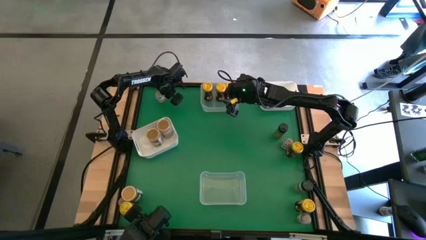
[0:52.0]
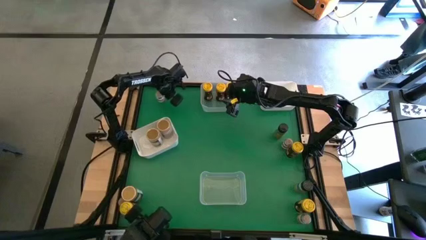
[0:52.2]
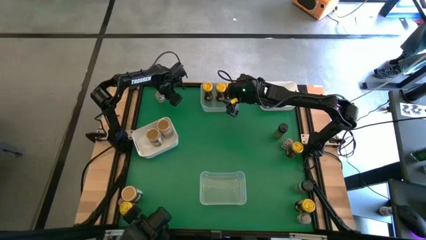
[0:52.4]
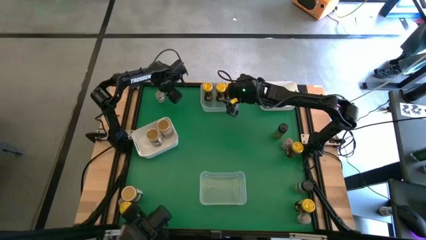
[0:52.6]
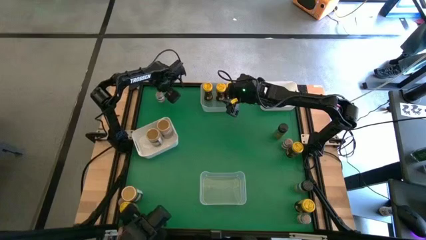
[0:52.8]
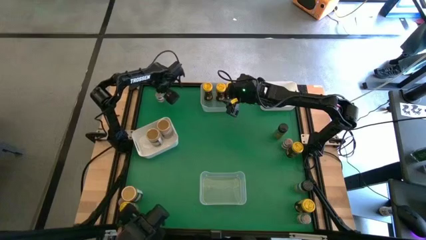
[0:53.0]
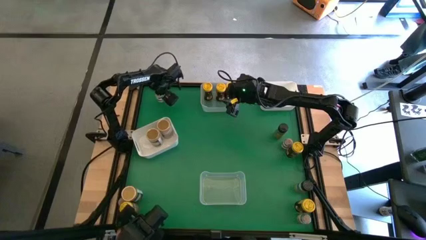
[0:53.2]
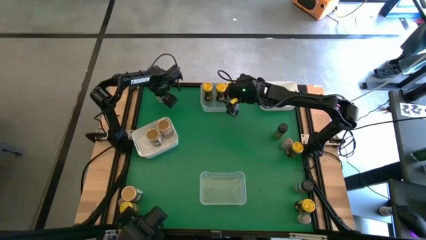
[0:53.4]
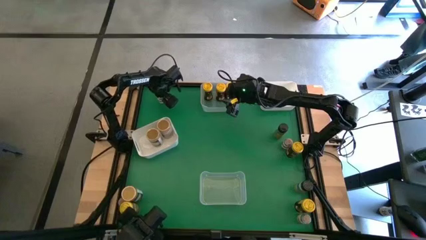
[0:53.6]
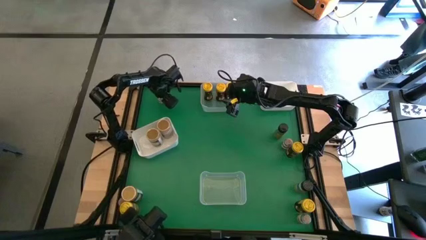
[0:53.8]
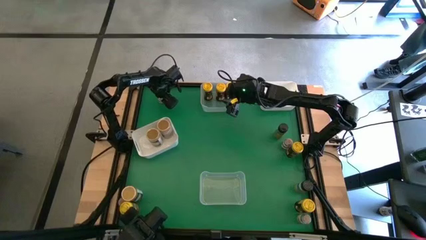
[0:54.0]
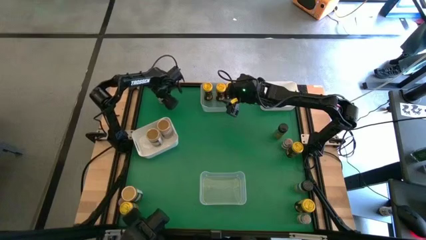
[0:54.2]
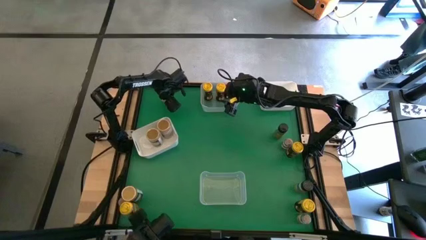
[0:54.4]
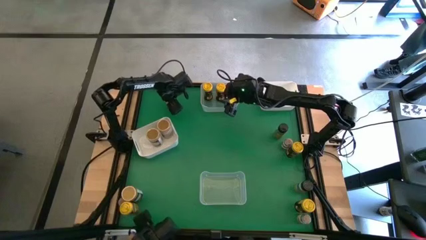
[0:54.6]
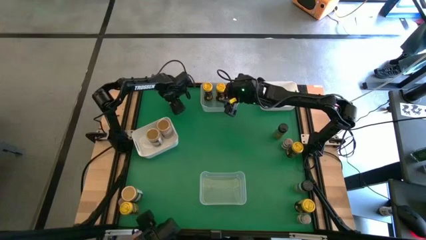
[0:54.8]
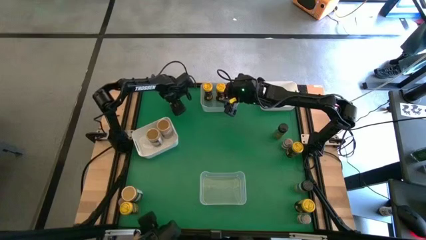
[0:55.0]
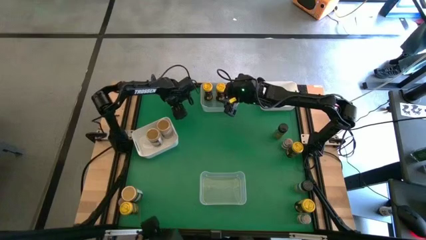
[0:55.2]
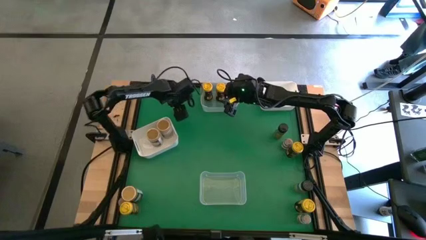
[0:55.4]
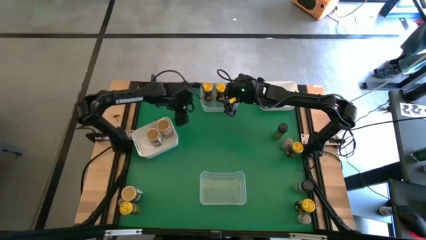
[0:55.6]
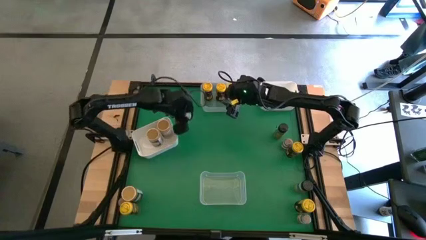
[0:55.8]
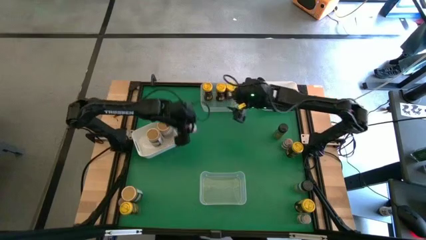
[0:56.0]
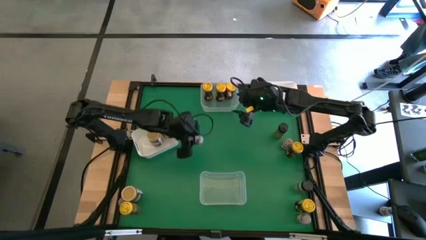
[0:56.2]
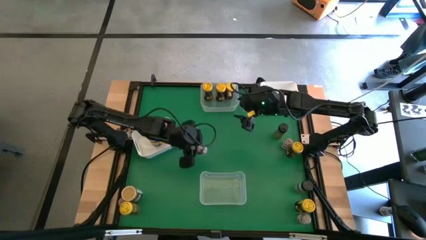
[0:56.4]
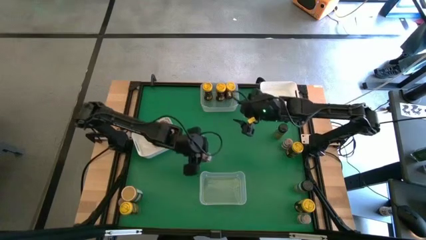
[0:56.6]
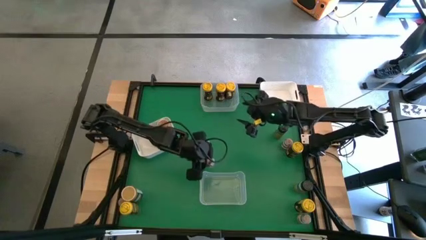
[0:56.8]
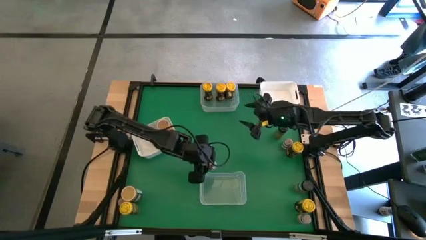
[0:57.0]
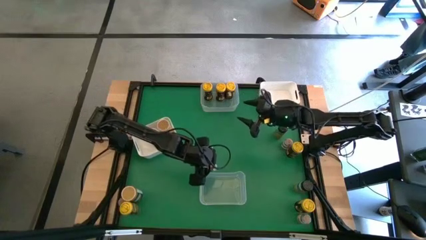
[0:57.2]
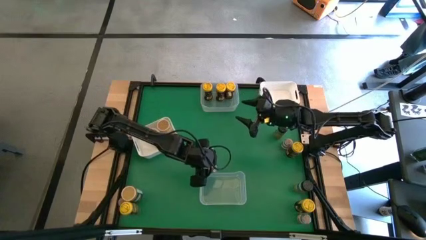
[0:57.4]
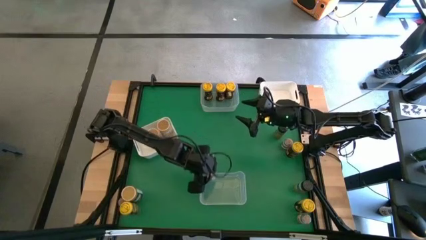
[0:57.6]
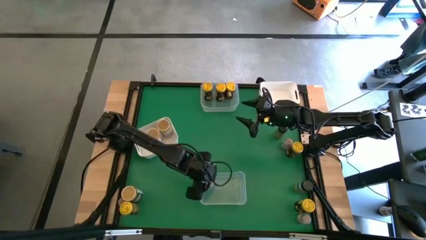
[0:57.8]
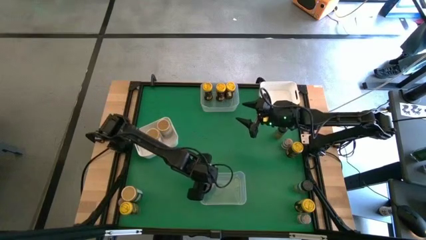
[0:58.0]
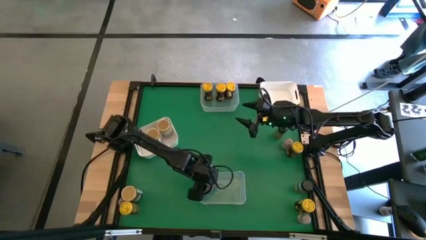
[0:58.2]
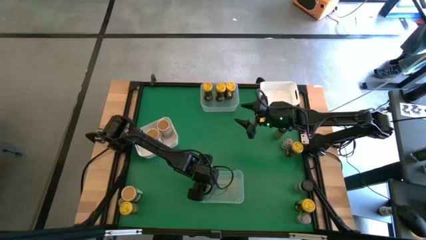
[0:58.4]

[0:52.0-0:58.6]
Task: Sort spices by type
Put the brown spice bottle into the bottom transparent bin

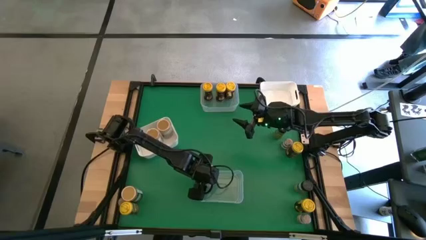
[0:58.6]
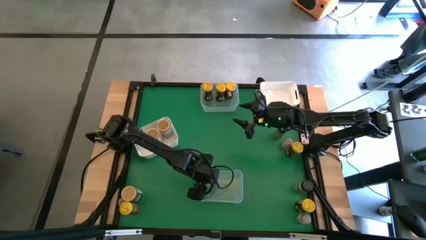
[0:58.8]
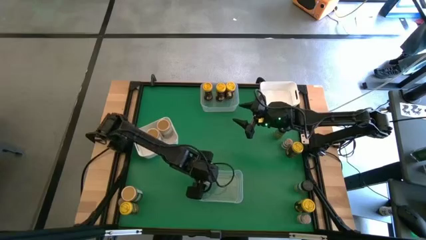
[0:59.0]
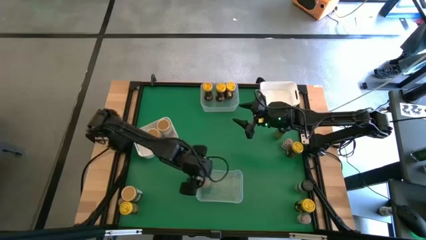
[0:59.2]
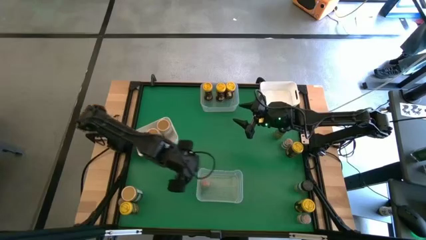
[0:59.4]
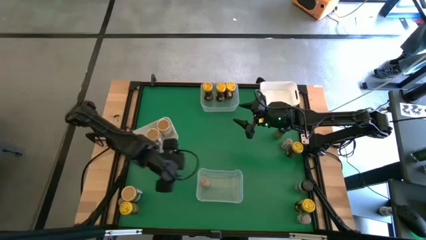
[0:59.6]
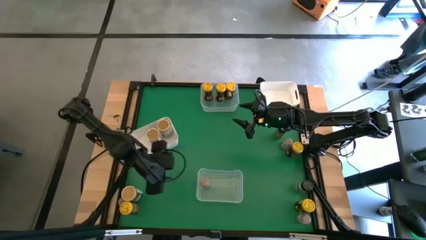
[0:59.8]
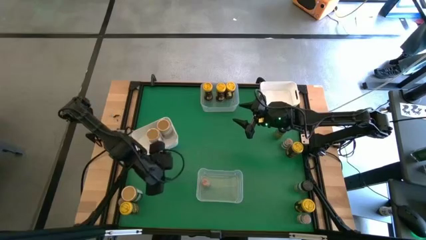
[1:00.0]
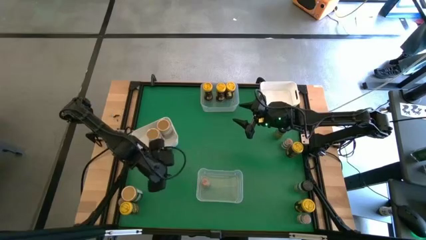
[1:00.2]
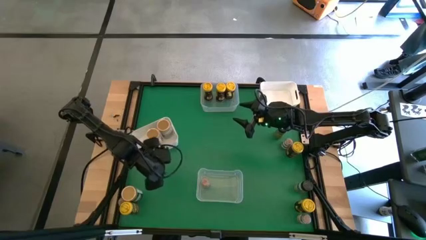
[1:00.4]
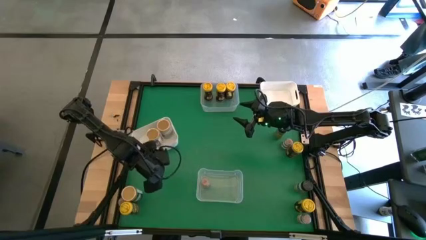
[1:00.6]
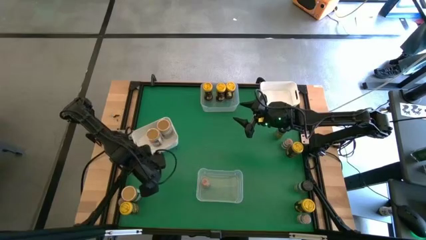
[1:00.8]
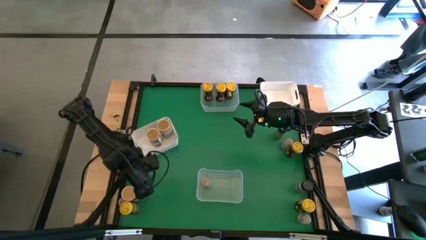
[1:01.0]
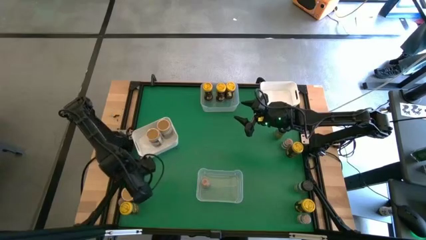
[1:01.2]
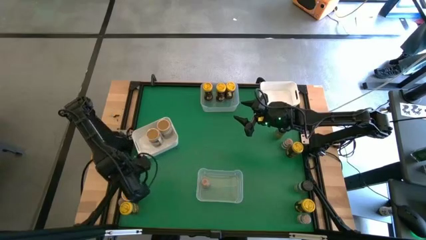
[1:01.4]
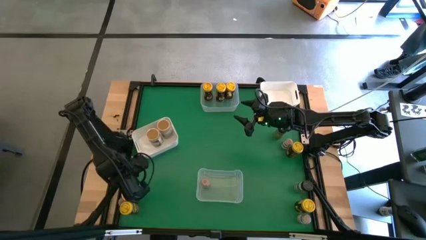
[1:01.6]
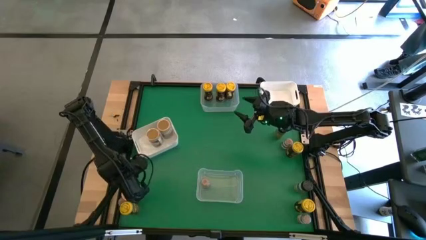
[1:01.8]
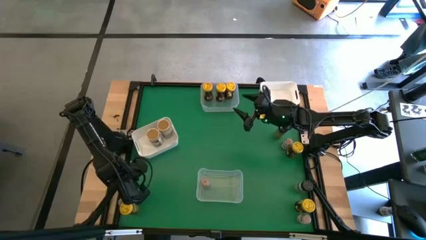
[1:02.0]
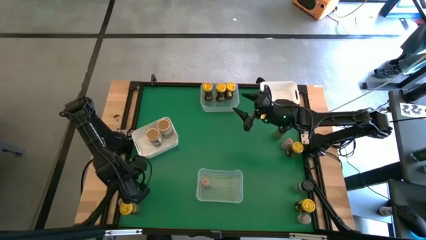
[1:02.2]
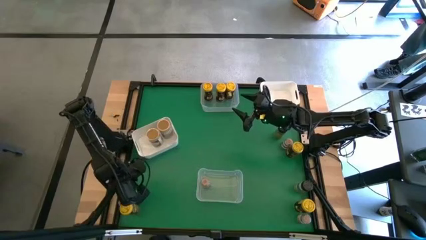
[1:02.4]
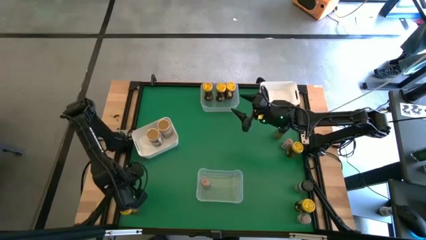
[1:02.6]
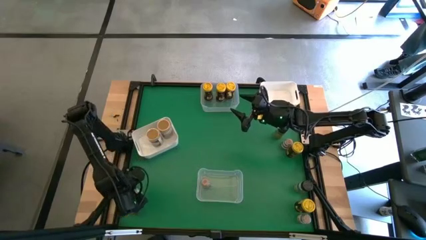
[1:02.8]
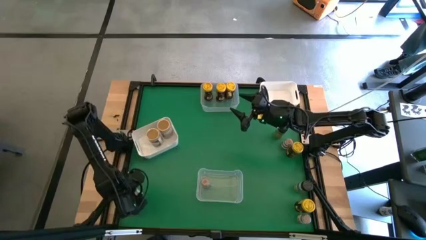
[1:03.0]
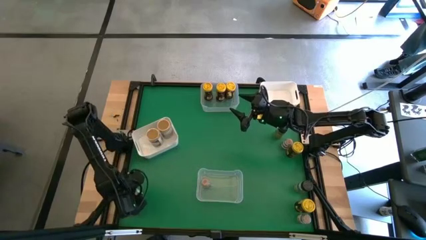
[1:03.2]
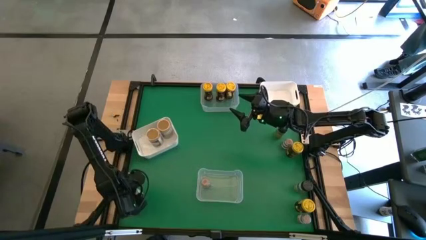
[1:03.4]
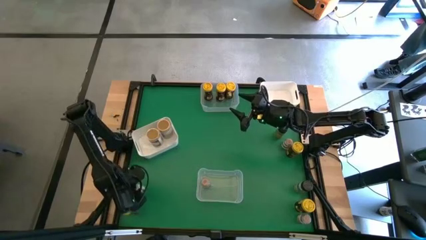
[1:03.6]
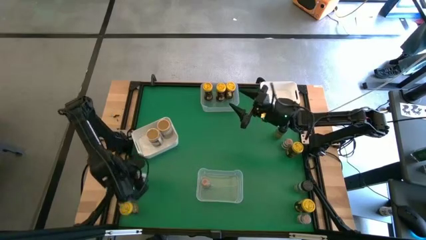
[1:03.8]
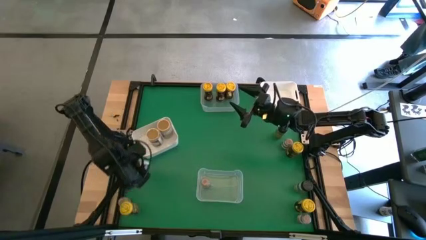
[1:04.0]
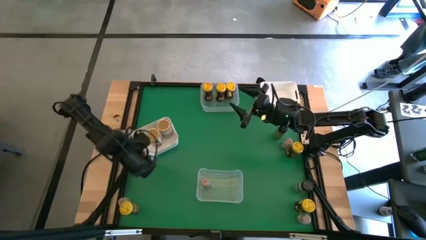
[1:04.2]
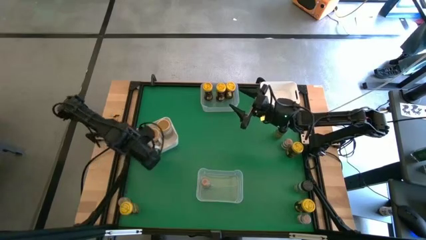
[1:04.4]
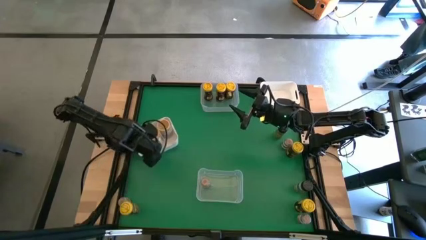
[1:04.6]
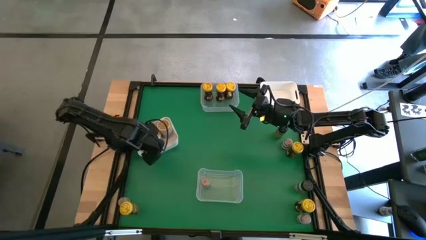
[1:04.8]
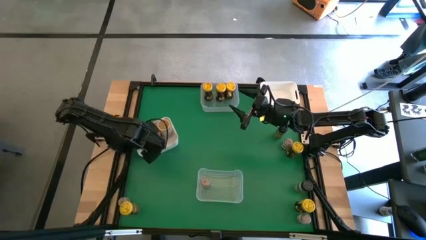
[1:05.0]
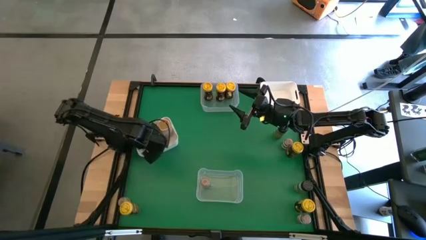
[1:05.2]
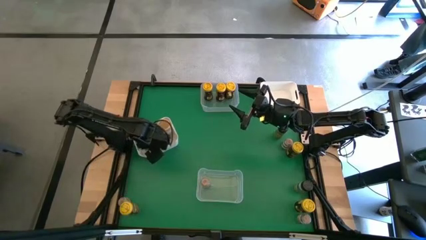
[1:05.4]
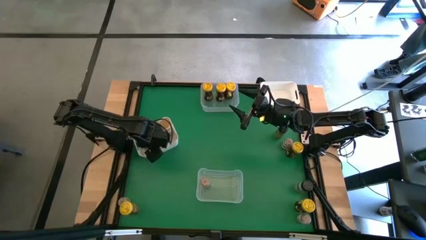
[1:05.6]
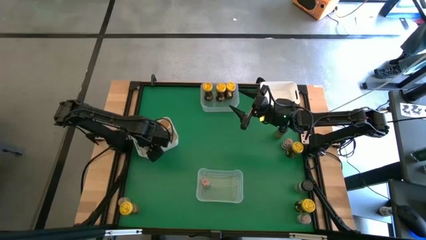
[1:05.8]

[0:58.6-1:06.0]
Put the gold spice bottle into the left white bin
